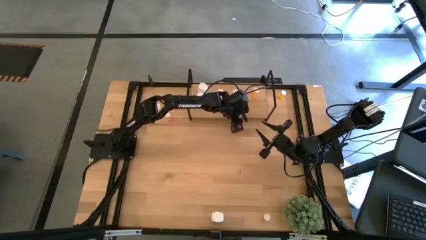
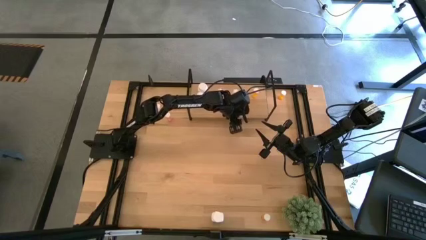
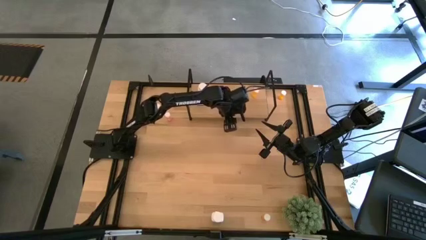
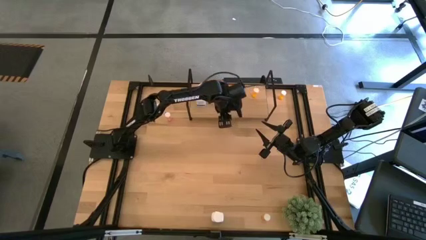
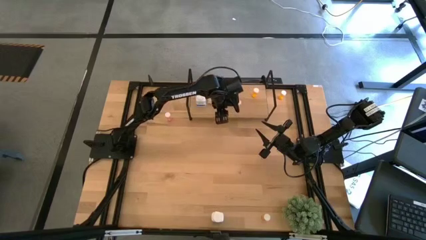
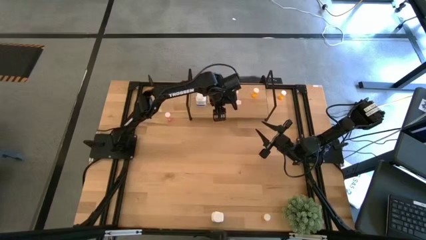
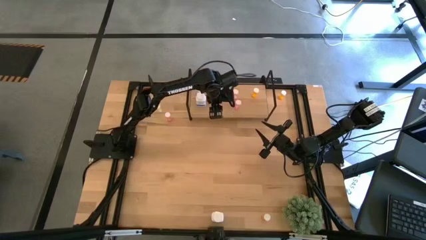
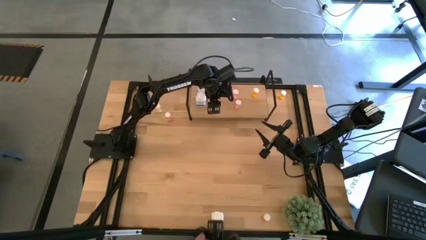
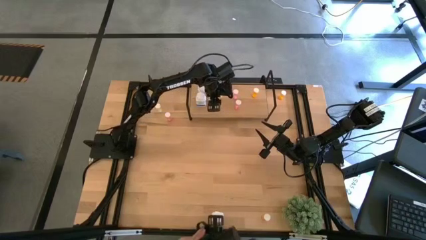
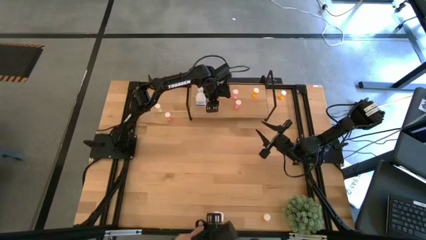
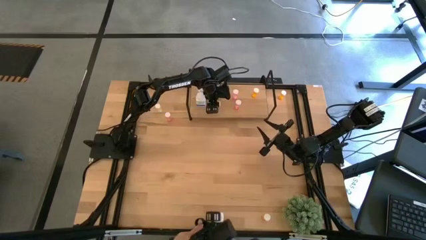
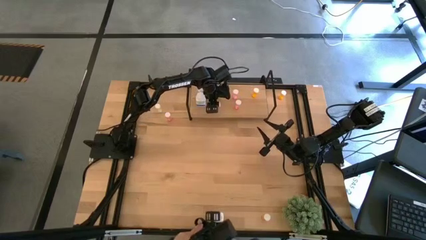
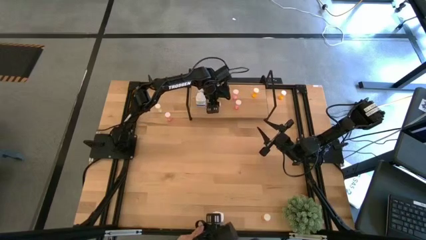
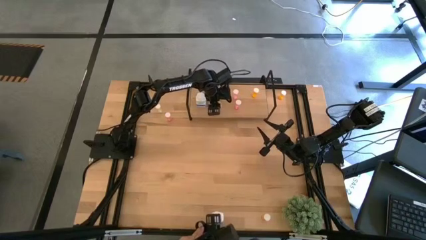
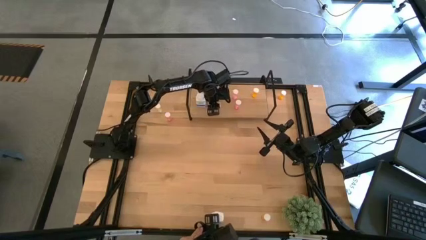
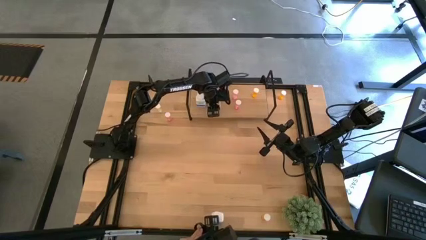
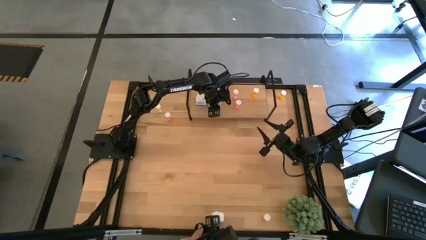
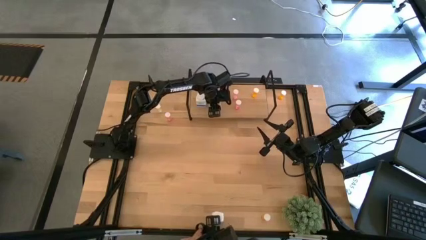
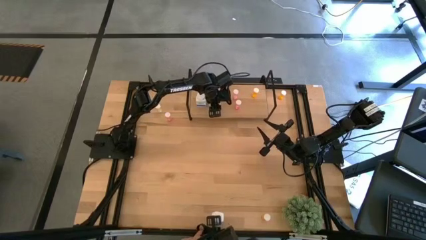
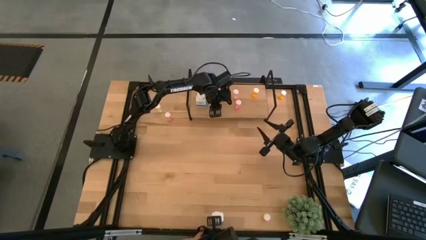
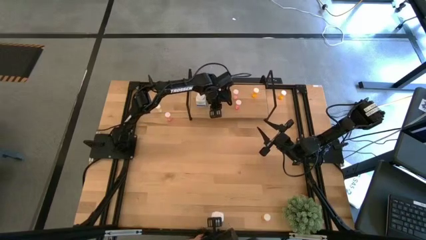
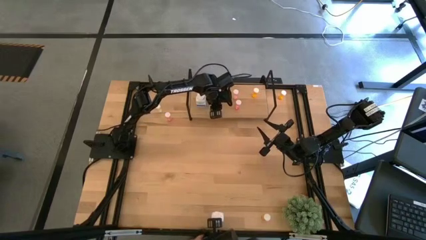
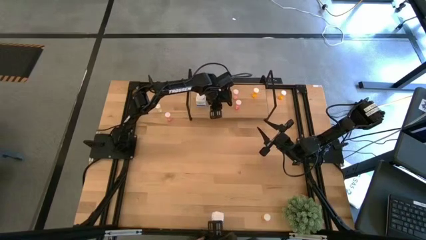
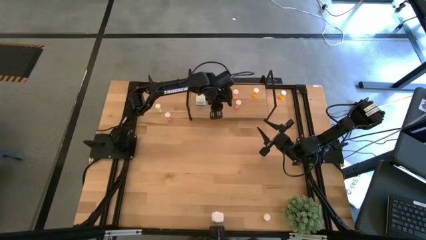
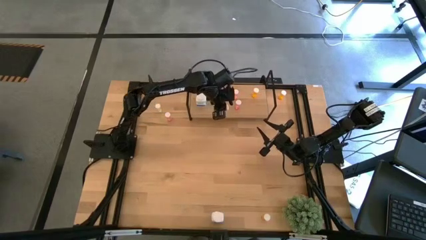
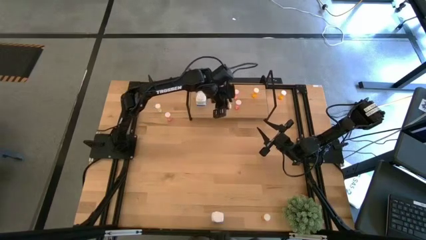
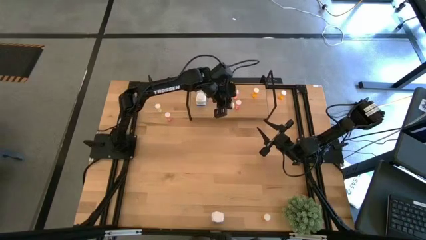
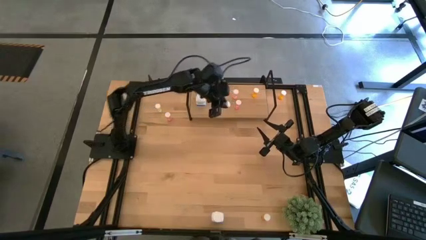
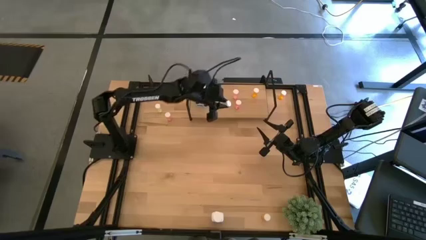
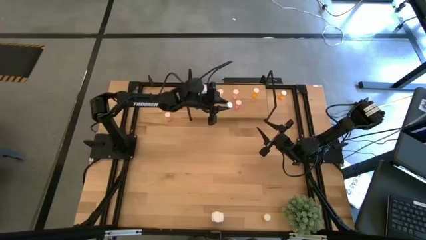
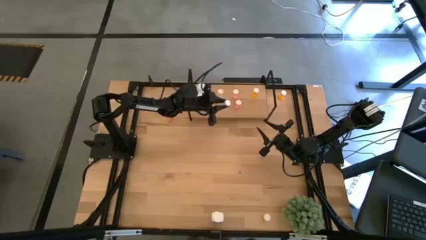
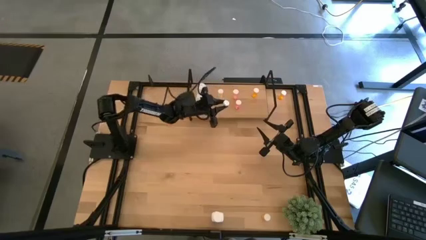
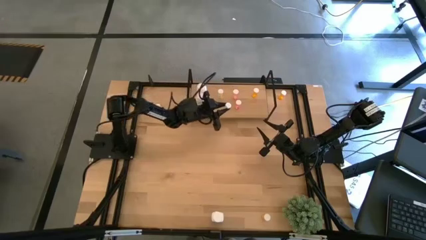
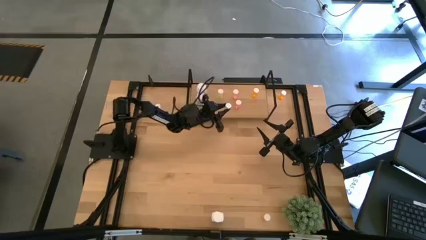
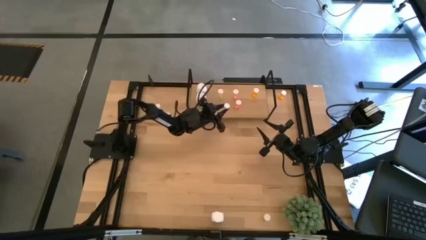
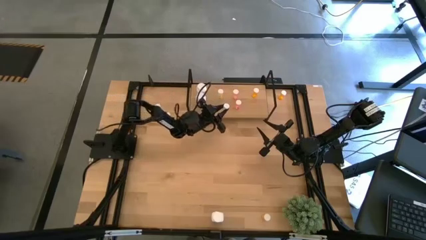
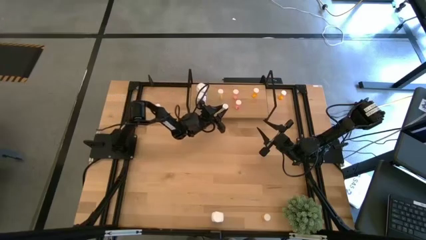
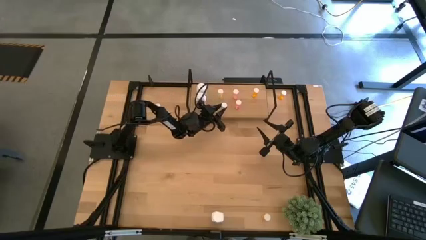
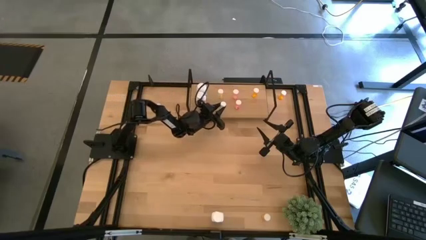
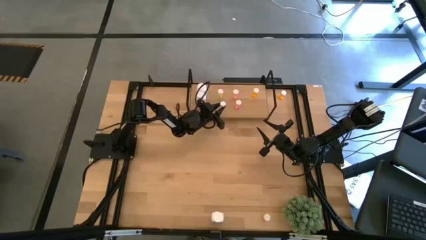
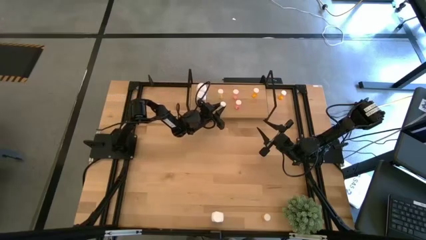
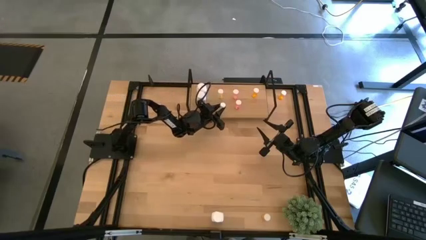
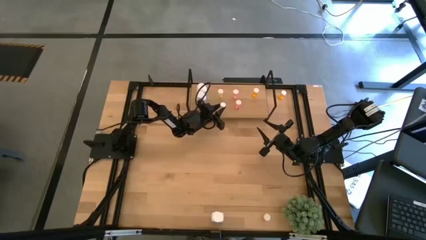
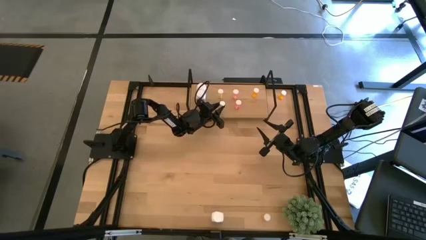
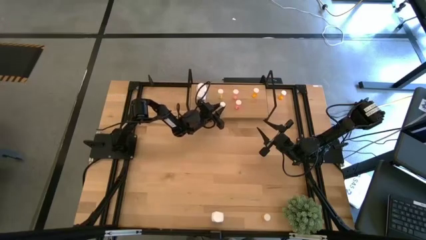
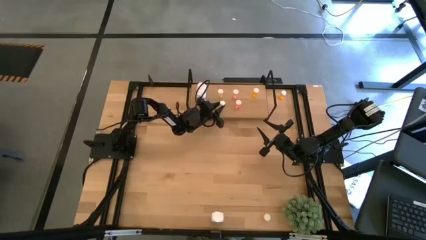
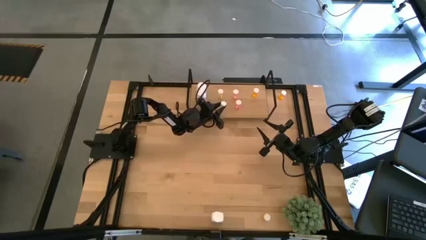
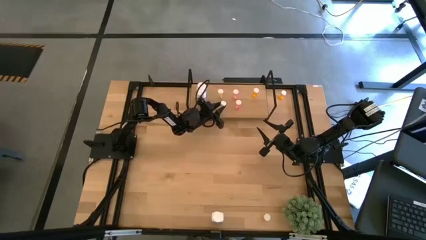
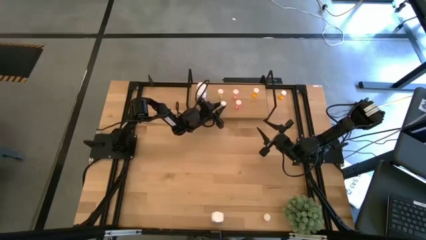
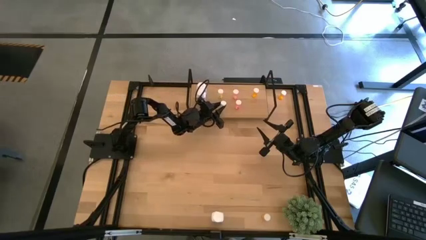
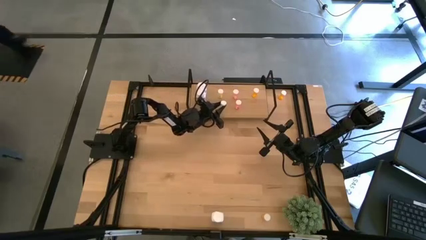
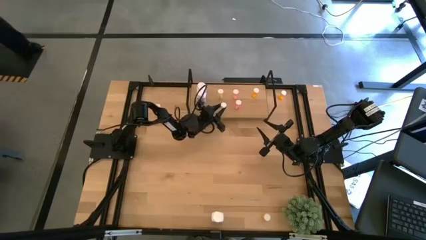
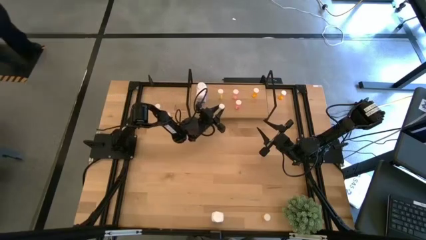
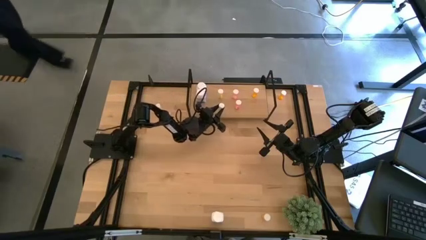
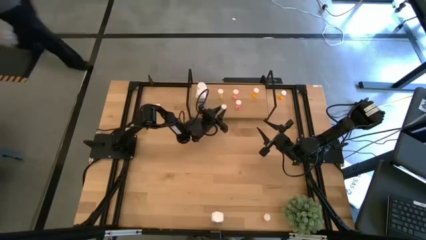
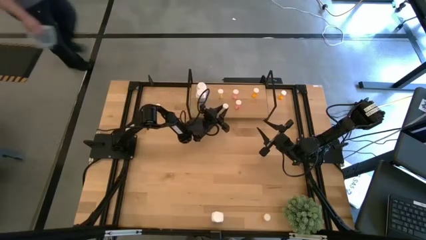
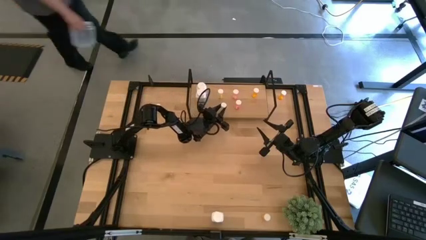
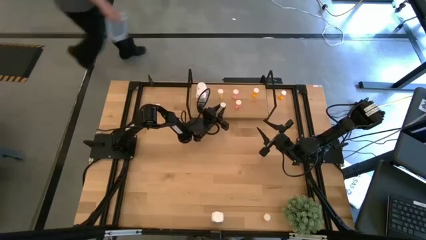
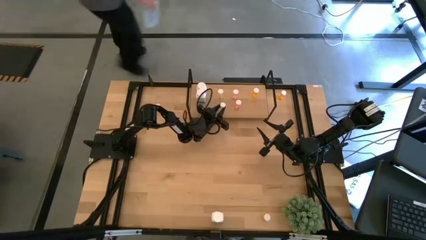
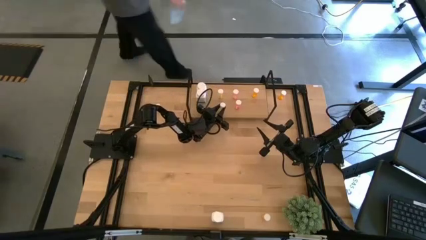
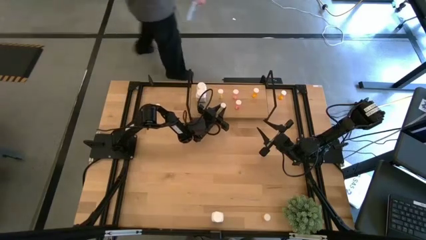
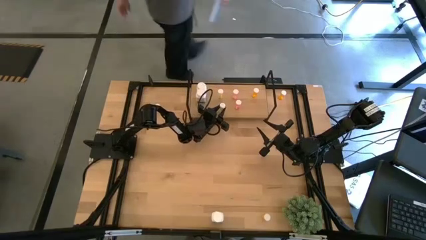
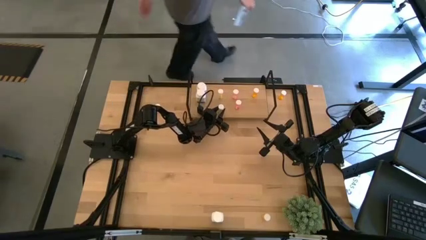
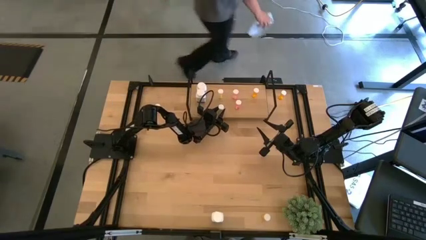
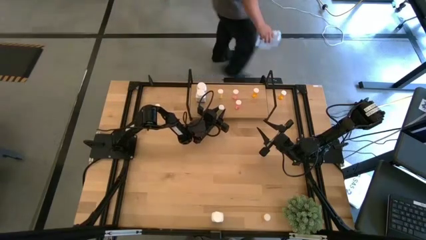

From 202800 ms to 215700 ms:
Task: Pick and place medicine bottles onto shelf by color
Put the bottom yellow pill bottle on the shelf aligned with the other yellow pill bottle
